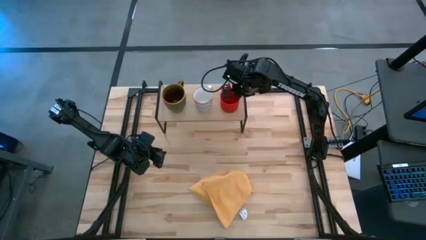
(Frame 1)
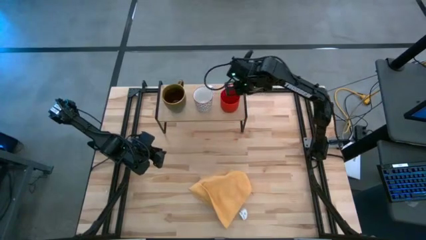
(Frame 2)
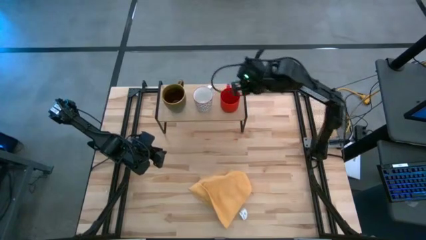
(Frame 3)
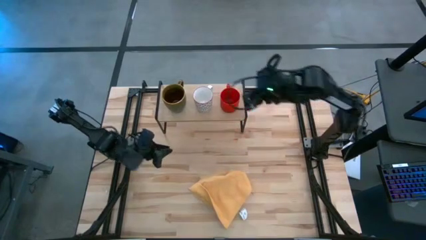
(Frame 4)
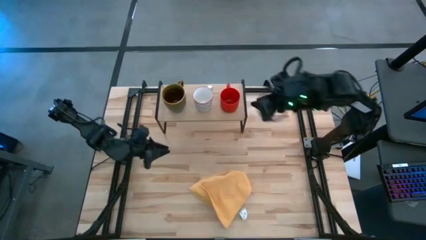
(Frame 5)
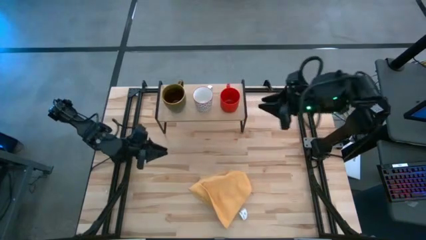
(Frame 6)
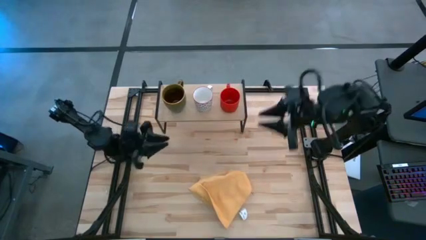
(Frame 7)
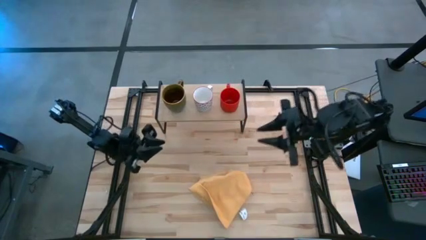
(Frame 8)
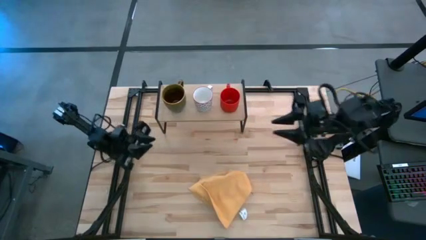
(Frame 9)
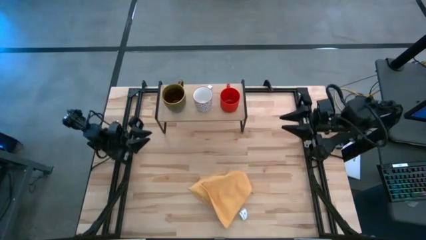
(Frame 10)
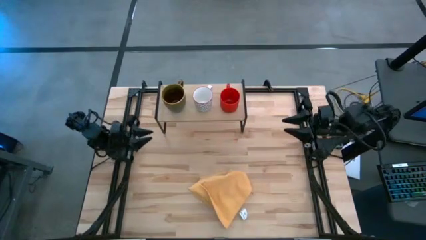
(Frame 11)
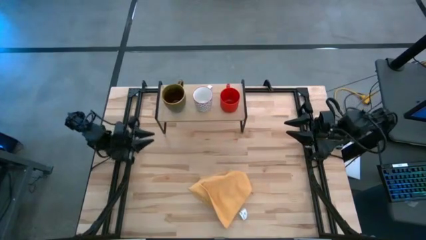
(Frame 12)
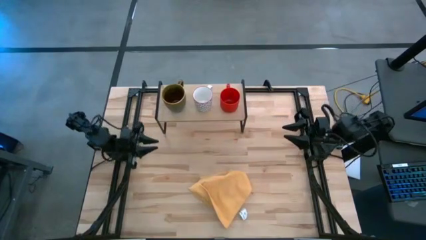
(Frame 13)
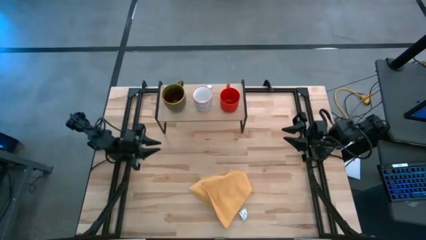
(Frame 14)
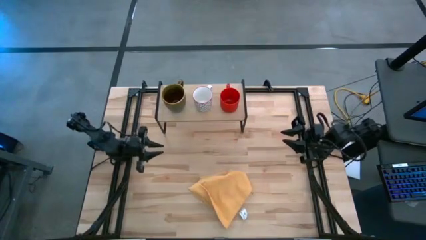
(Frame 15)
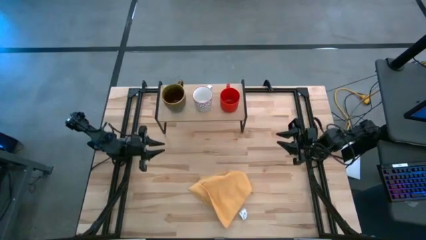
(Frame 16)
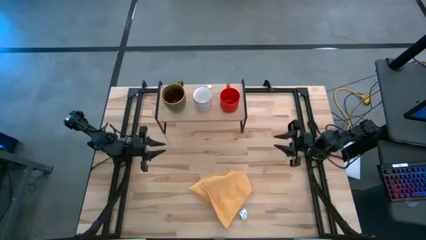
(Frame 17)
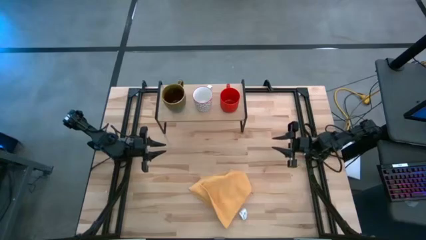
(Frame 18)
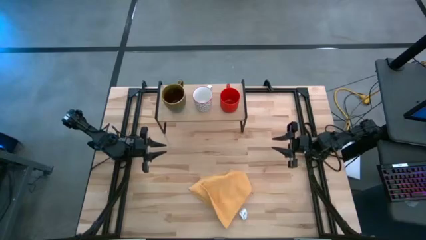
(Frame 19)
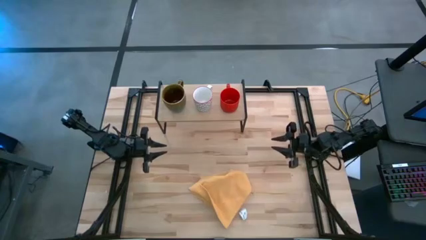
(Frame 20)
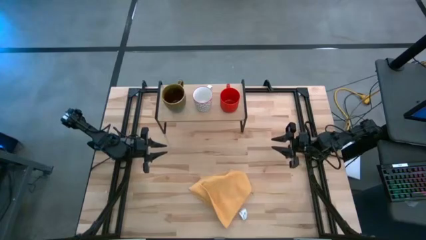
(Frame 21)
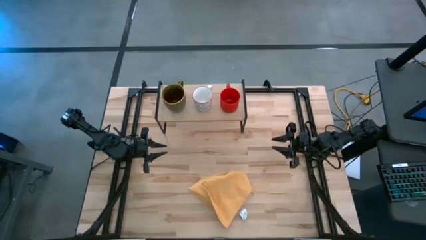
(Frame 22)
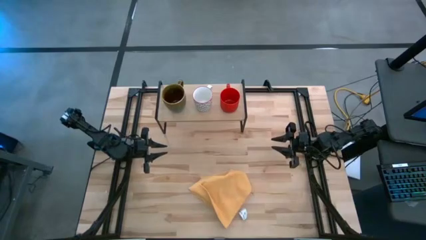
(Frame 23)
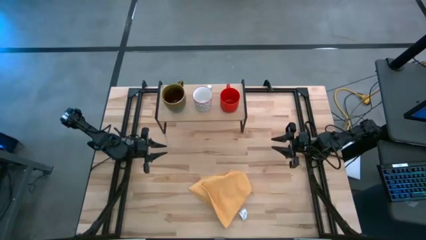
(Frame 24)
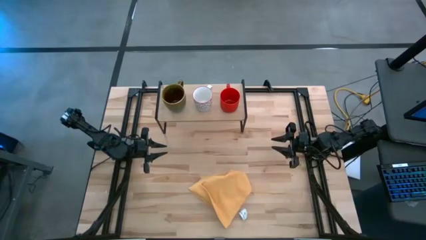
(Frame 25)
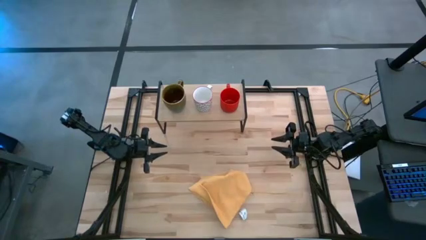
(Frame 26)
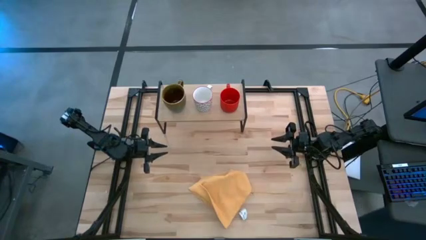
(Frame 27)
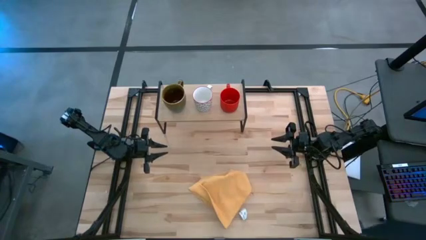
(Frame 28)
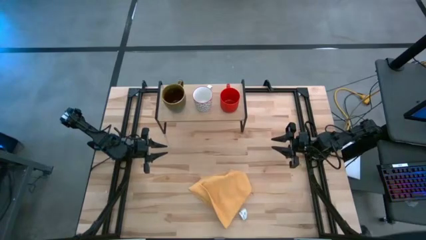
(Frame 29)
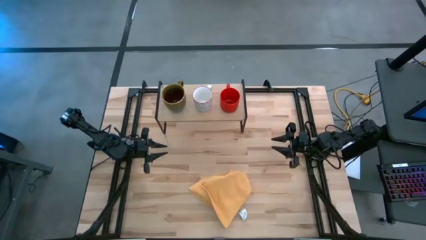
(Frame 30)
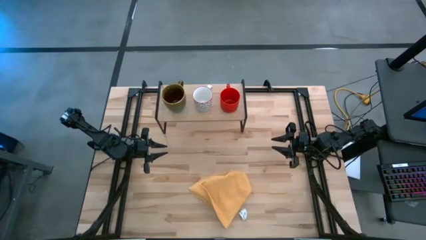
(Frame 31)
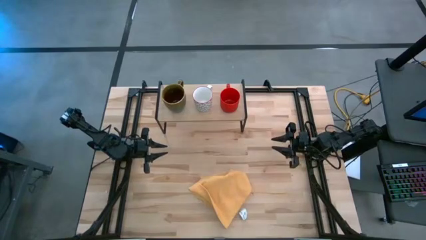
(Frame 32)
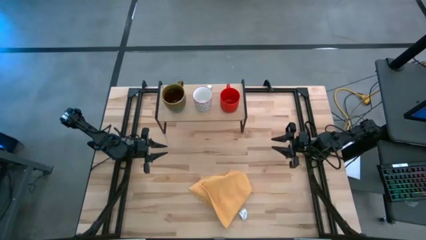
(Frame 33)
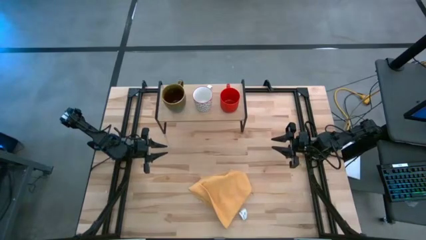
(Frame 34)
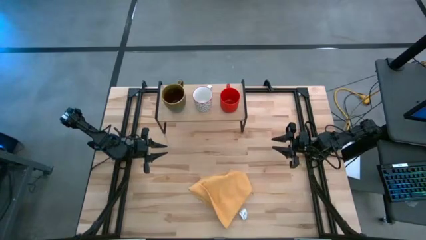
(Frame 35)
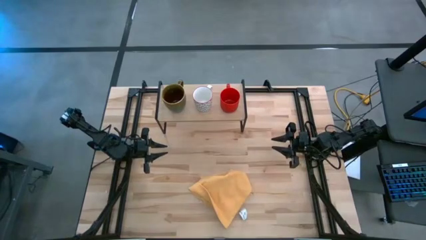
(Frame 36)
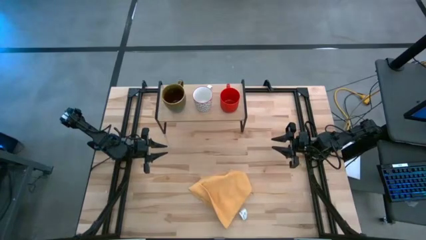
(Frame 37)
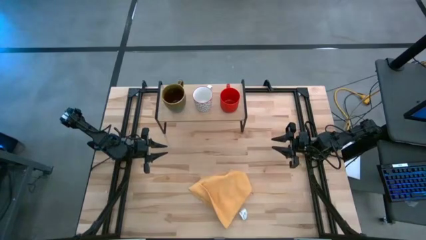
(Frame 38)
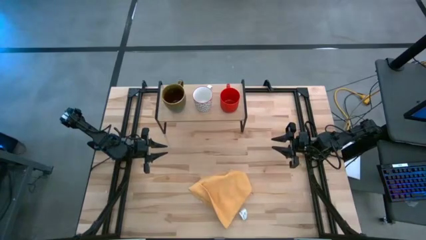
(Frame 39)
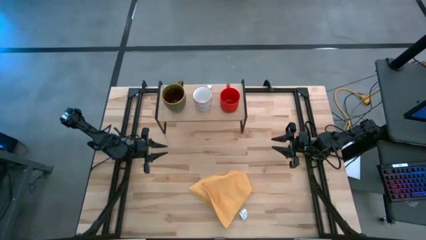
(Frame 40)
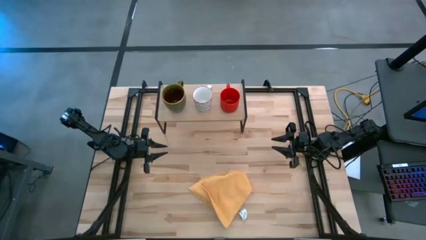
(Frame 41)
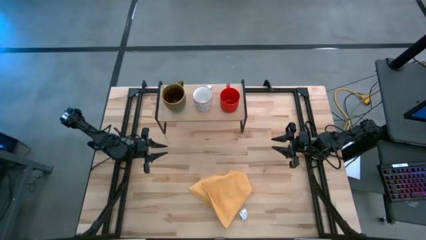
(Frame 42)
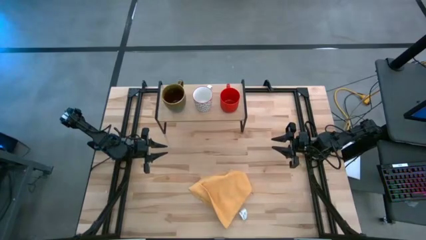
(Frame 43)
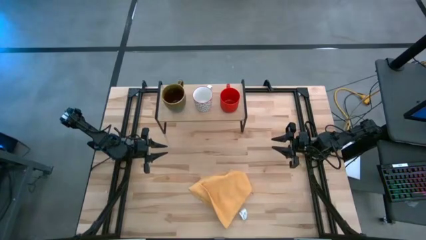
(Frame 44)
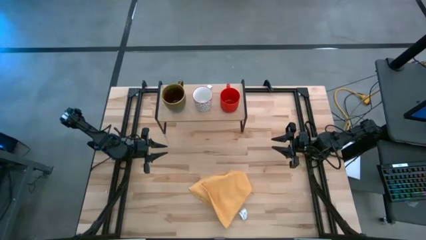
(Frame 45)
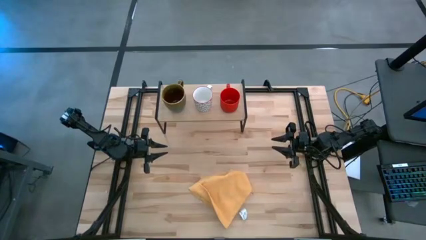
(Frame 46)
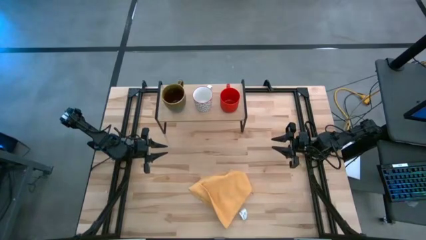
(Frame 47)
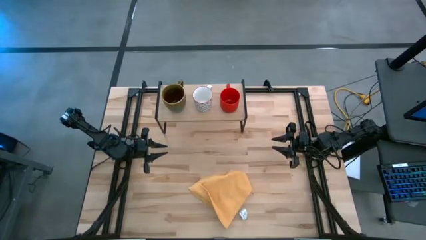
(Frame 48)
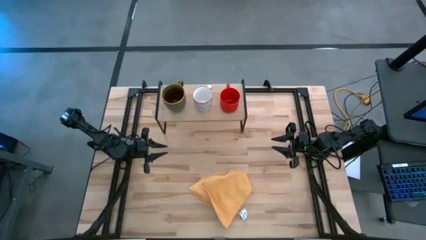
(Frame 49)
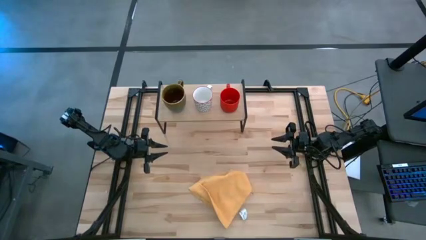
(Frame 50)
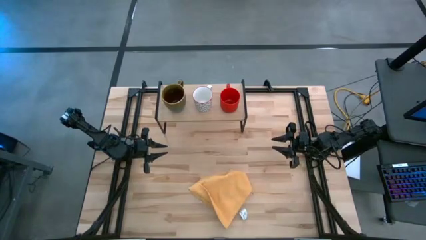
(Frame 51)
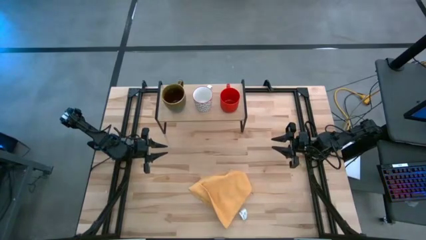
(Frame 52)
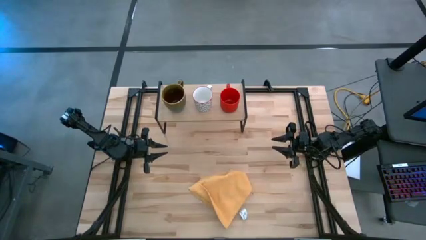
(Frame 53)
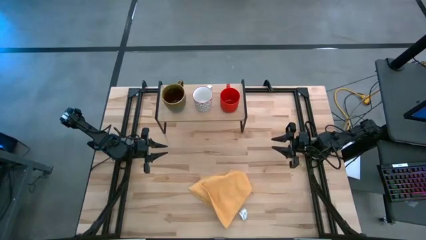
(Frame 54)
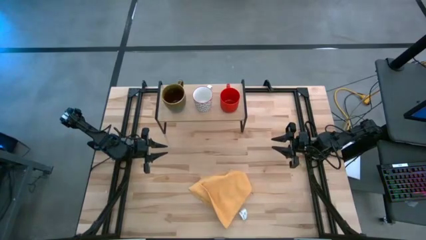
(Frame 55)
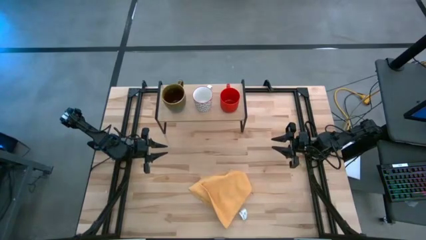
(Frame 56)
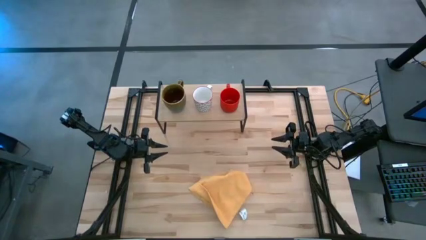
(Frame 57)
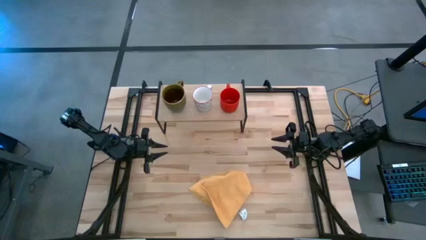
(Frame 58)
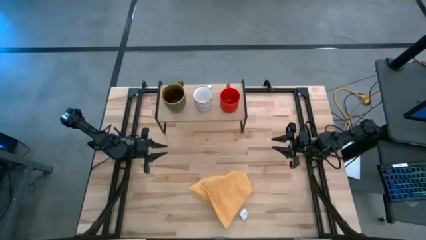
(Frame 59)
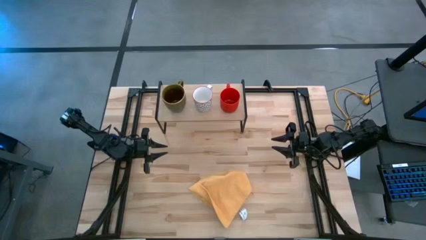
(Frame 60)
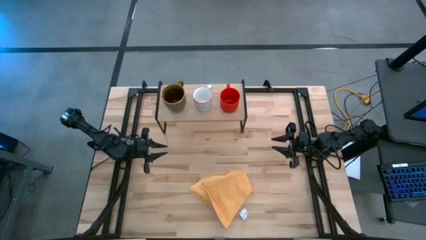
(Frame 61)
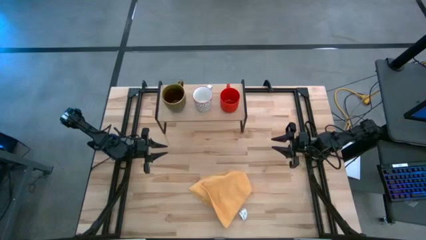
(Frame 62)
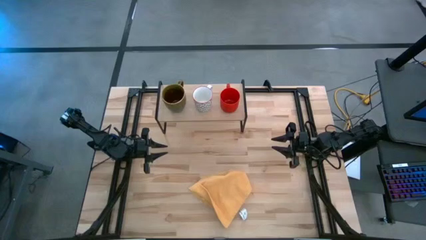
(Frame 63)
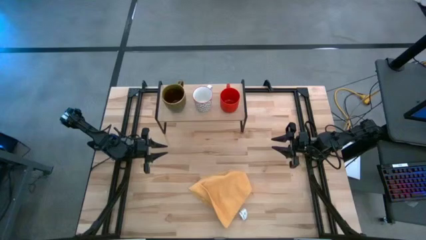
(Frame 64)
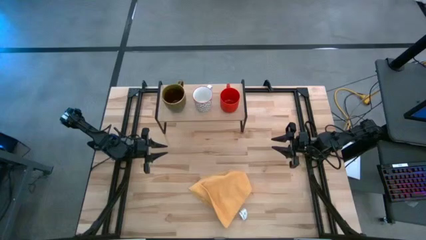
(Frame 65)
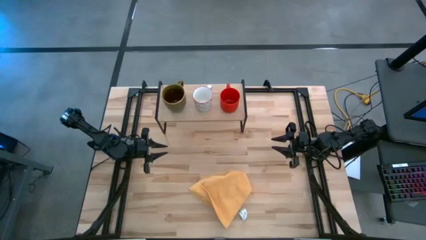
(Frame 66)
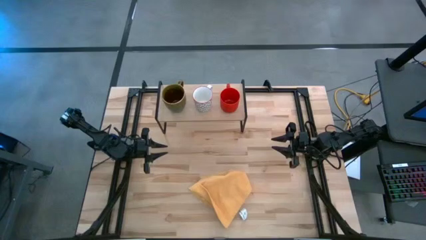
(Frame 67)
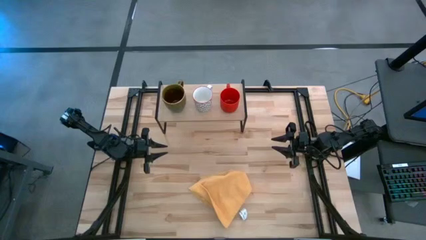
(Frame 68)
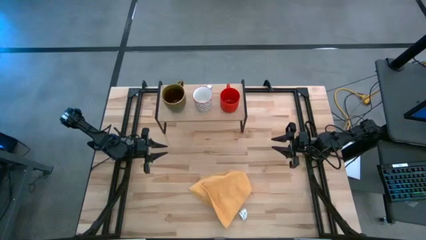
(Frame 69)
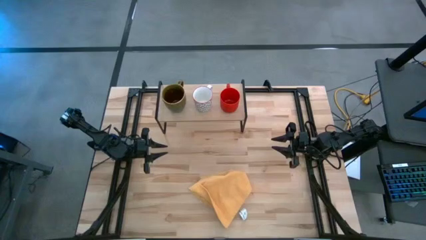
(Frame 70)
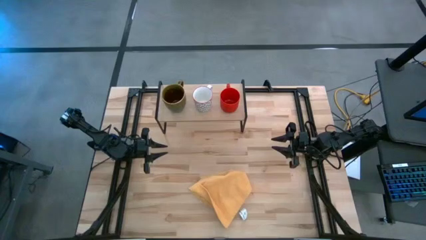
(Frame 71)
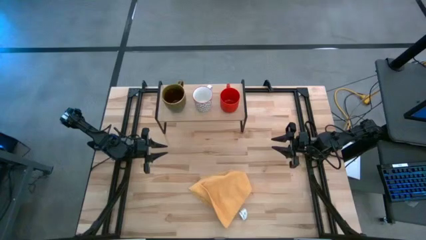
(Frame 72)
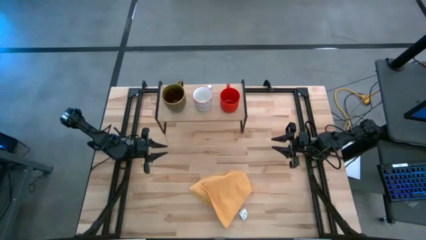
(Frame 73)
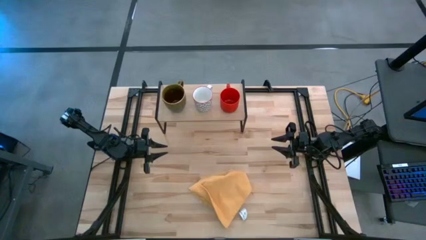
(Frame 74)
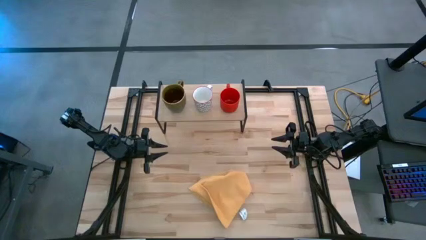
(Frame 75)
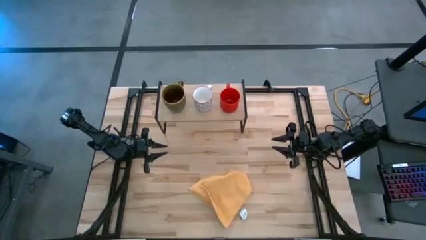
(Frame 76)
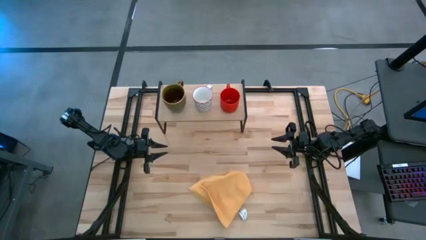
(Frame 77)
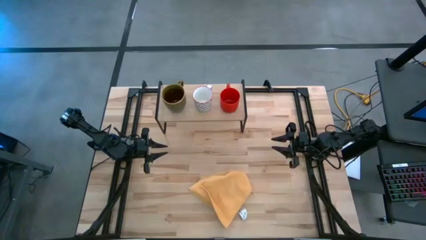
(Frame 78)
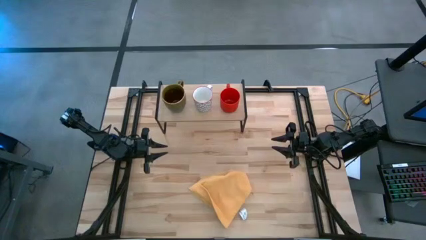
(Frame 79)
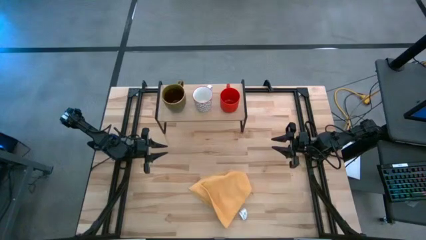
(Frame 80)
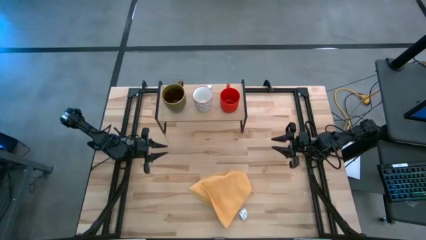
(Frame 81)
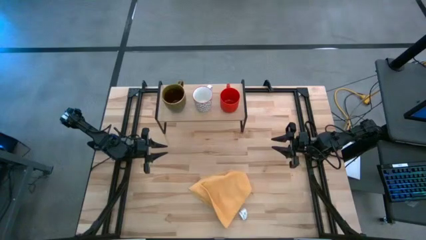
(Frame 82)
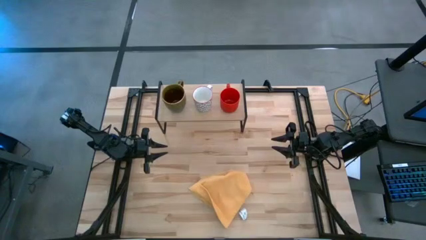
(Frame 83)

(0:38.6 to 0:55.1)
Task: Stack small to large cups/mugs on shelf
Return to Home Position
